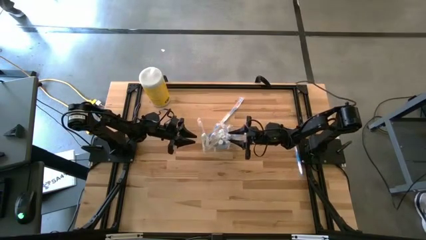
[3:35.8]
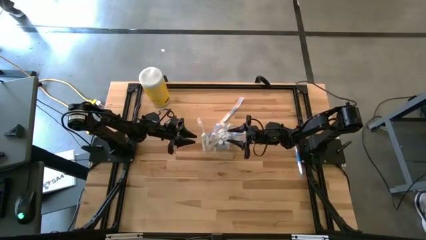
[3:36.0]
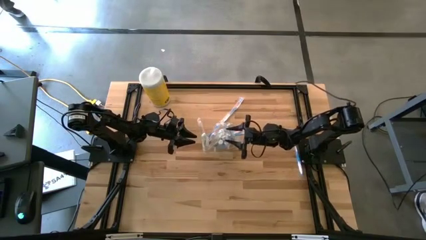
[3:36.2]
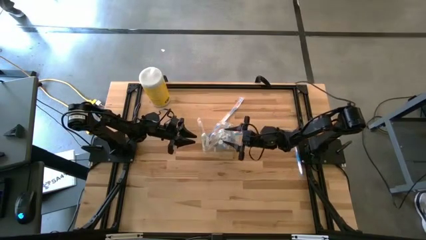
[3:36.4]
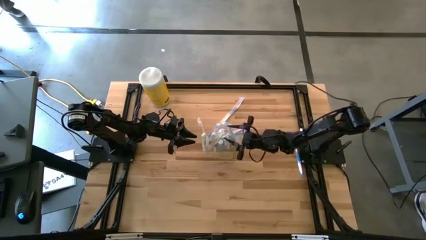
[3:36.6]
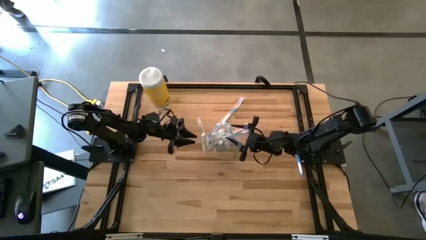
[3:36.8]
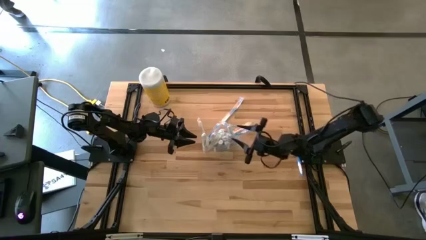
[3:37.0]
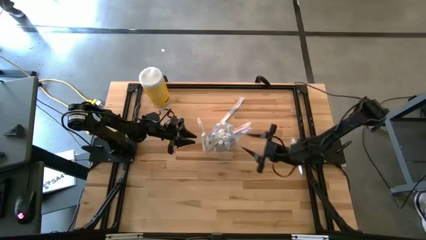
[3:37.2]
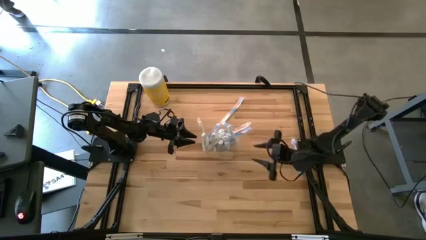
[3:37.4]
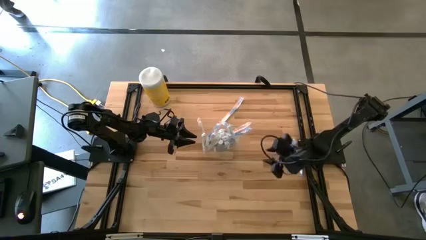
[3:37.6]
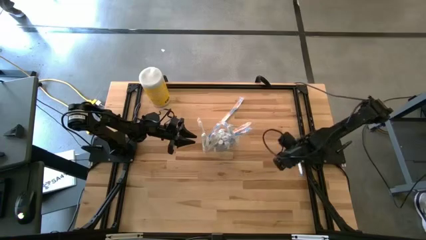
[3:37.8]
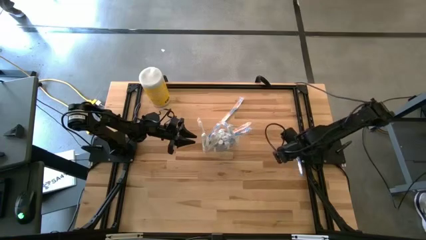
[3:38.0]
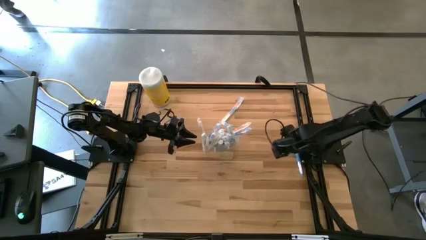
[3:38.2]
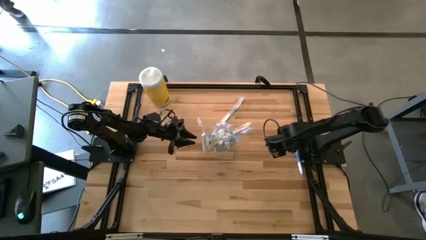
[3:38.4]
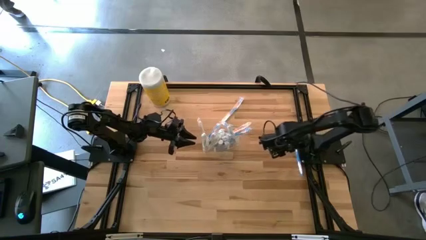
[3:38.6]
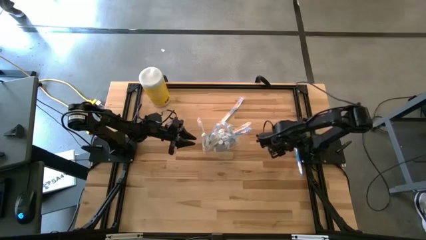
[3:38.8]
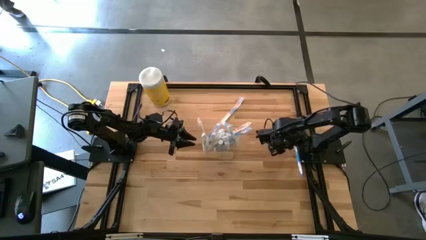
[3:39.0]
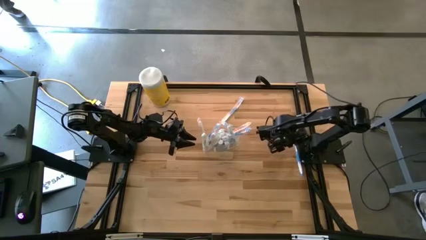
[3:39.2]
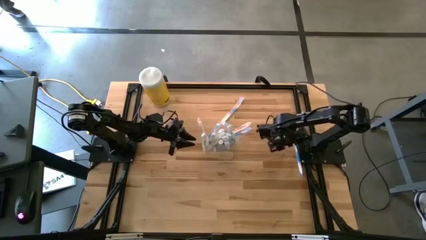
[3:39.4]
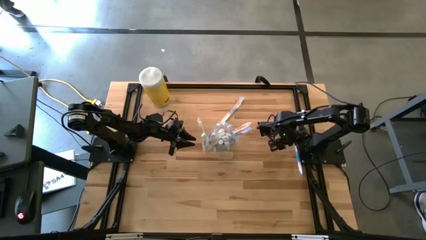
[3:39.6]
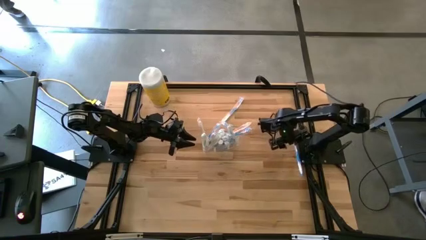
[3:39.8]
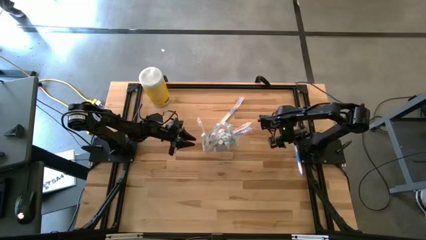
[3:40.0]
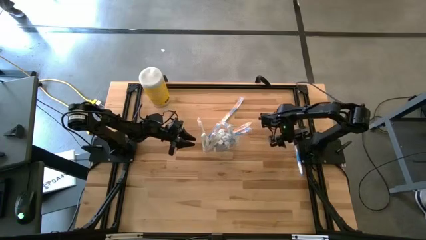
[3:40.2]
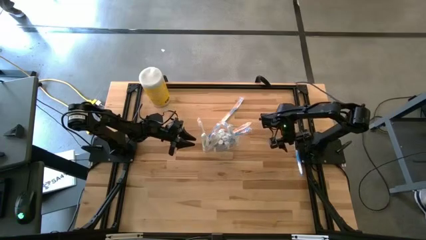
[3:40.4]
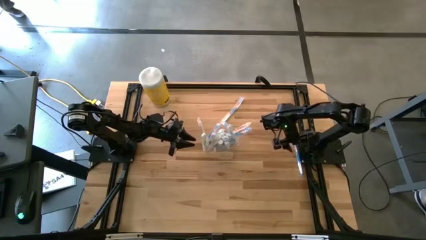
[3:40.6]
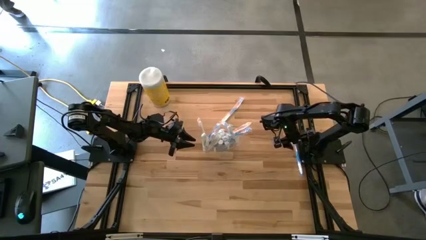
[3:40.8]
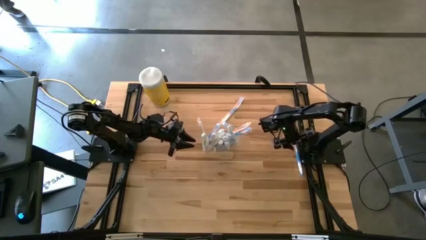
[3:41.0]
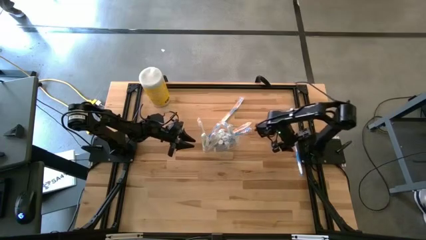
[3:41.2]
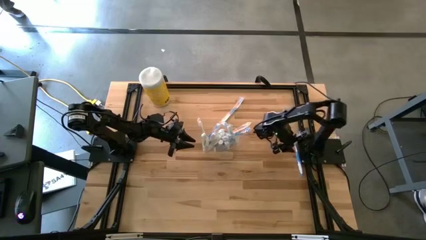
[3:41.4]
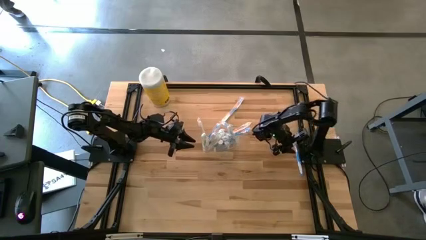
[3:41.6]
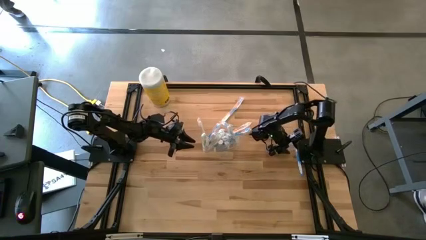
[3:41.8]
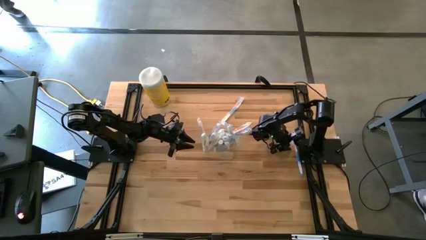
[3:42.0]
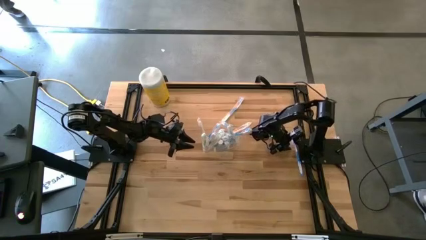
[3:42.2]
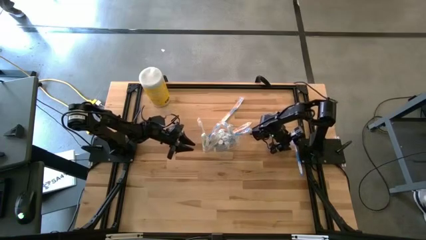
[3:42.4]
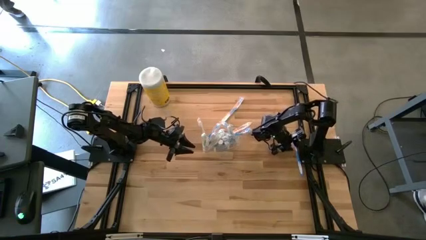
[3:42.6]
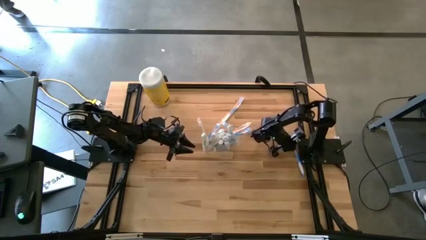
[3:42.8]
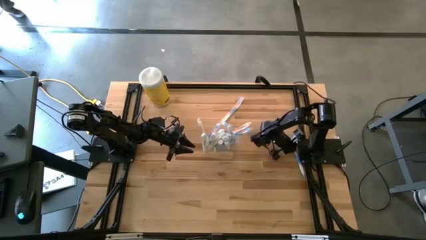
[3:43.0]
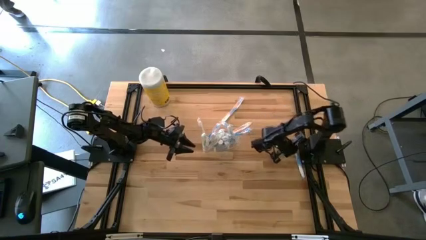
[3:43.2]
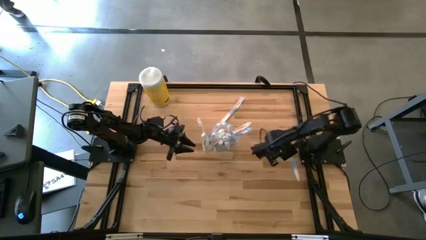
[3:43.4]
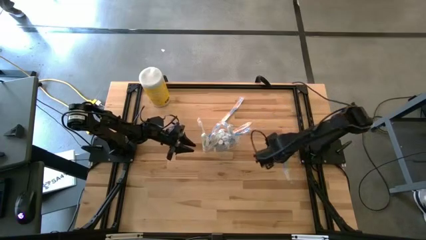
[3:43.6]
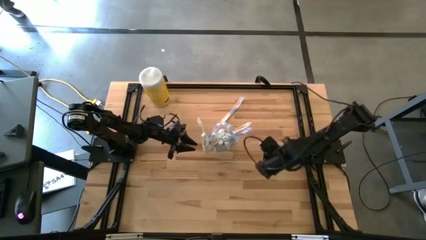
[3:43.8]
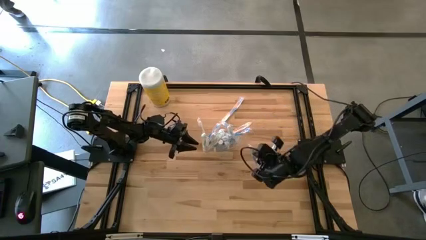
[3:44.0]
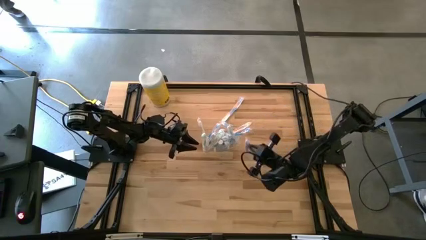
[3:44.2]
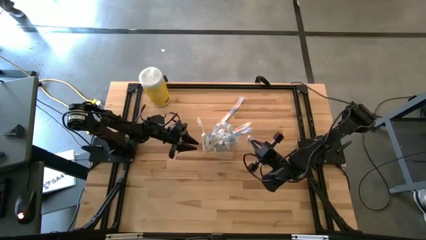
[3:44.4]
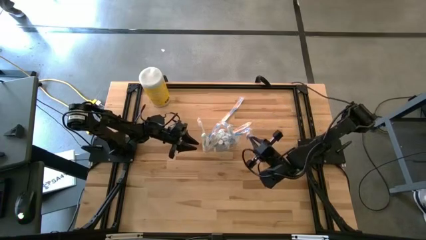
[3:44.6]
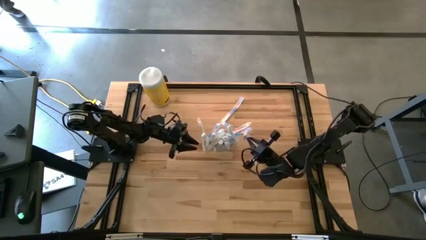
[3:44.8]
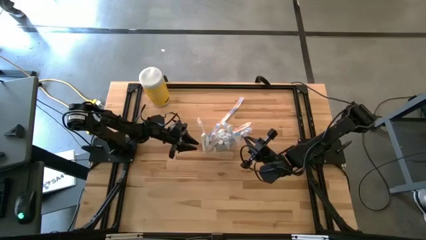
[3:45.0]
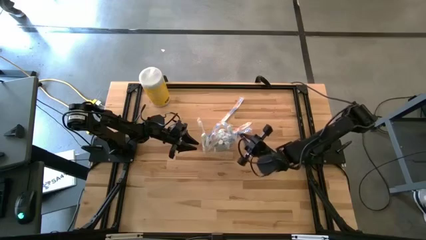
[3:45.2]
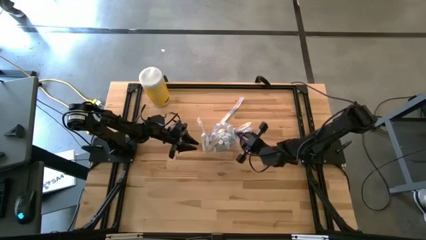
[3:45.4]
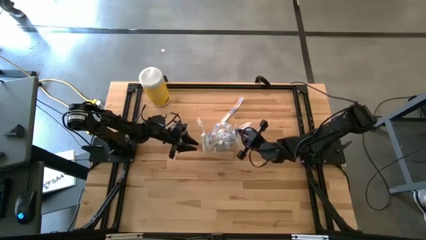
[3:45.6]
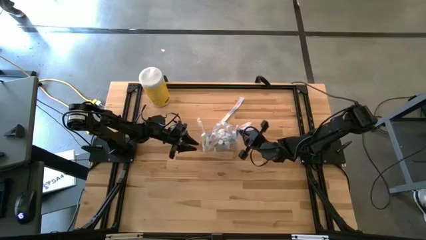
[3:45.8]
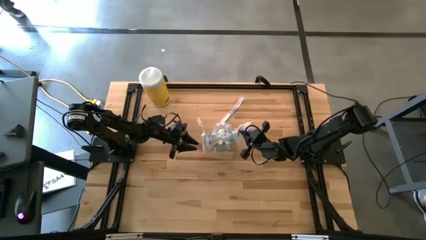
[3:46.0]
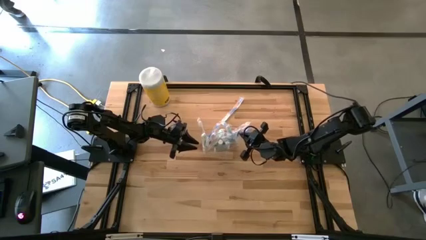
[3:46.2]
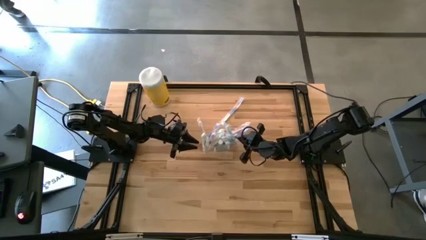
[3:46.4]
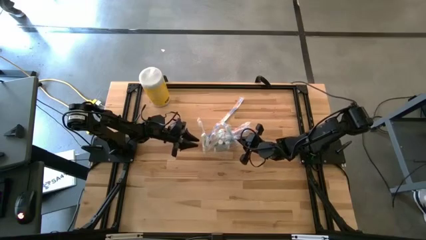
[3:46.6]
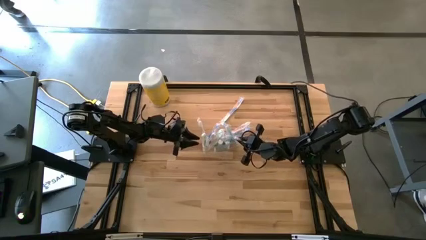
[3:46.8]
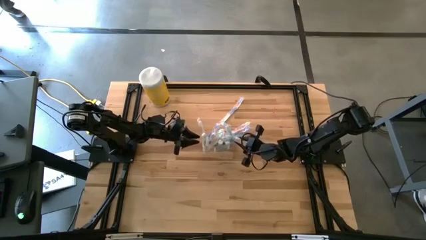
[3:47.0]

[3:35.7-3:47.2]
Task: Pick & Place toothbrushing station
Put the blue toothbrush into the transparent organizer

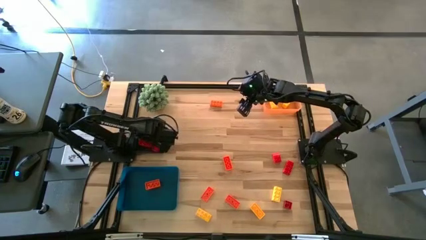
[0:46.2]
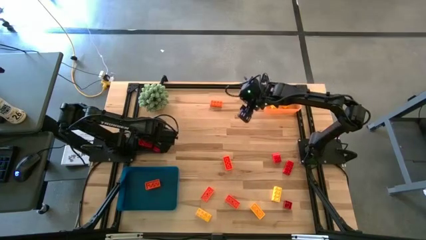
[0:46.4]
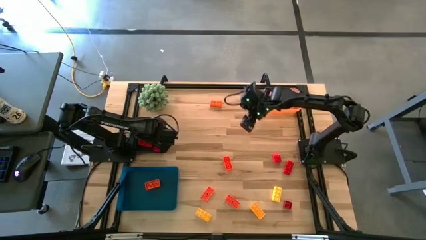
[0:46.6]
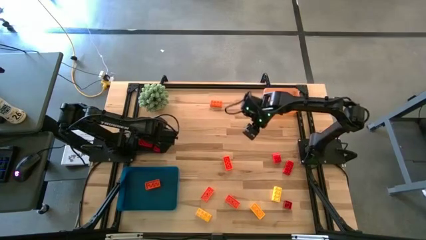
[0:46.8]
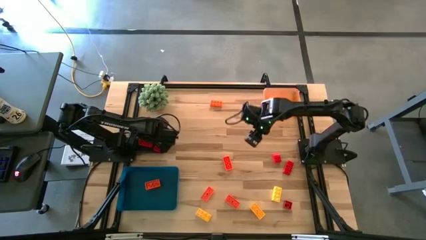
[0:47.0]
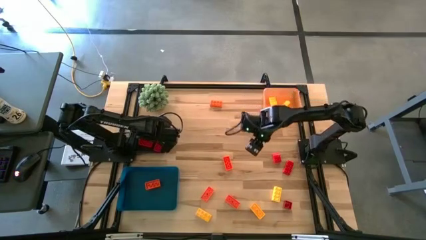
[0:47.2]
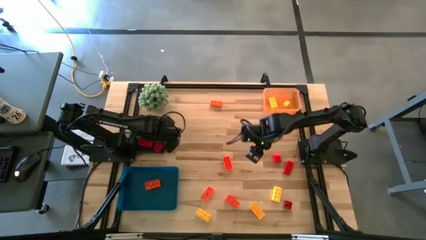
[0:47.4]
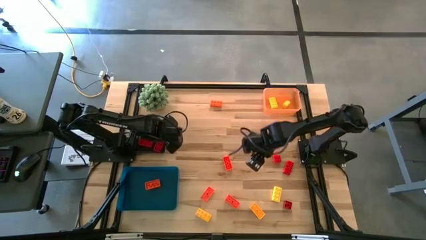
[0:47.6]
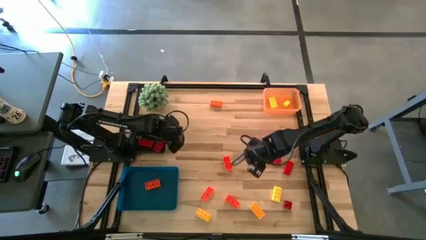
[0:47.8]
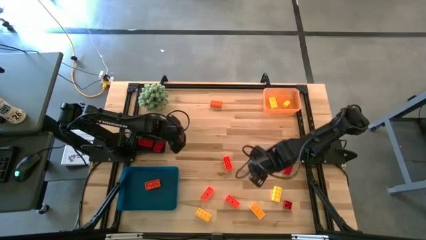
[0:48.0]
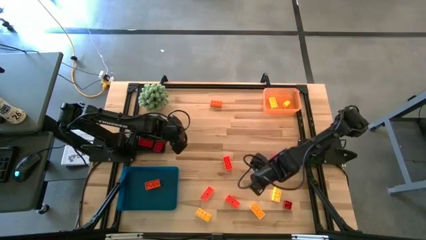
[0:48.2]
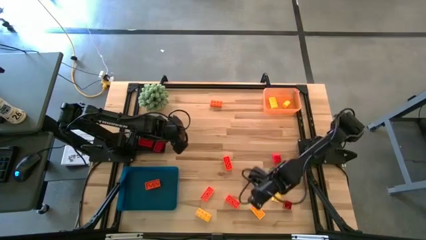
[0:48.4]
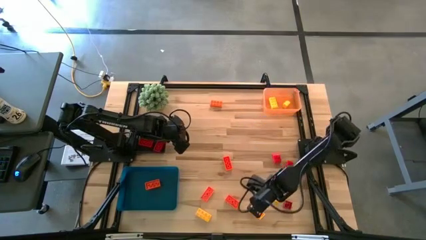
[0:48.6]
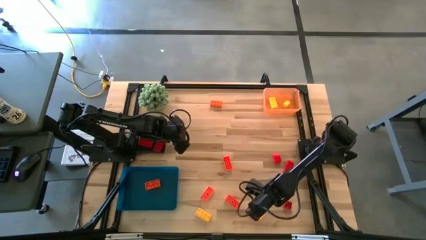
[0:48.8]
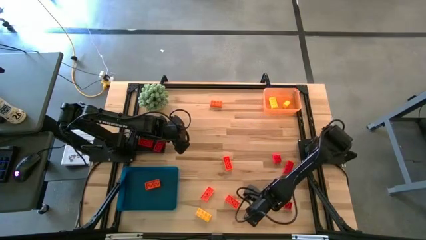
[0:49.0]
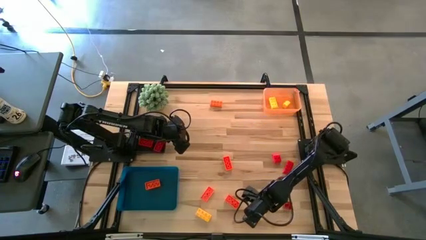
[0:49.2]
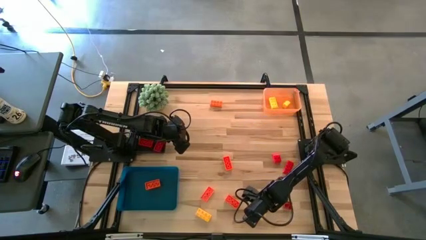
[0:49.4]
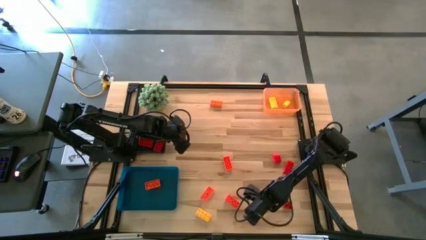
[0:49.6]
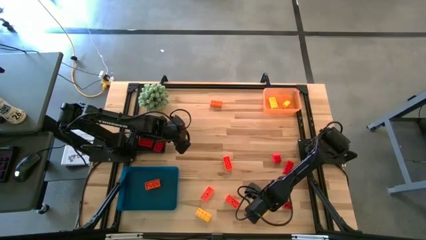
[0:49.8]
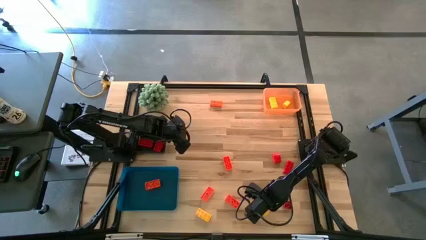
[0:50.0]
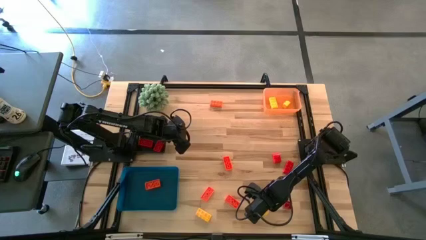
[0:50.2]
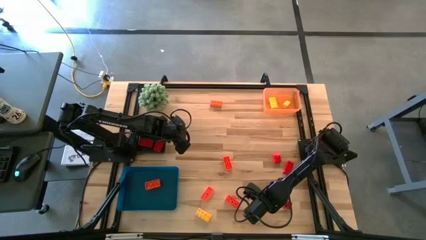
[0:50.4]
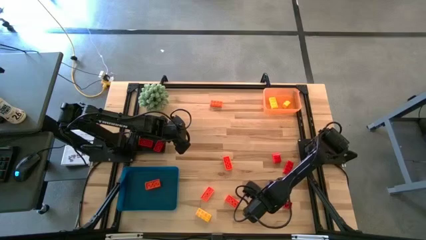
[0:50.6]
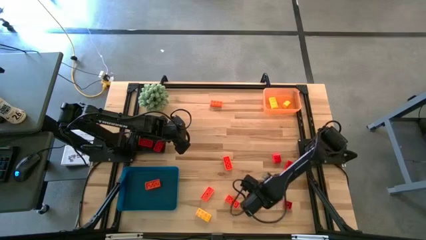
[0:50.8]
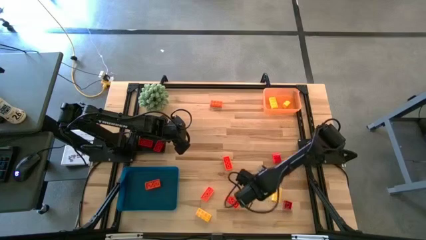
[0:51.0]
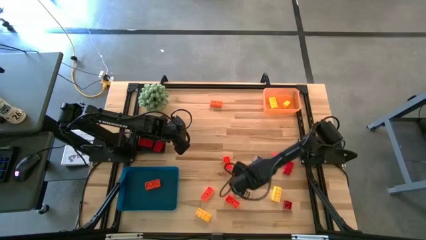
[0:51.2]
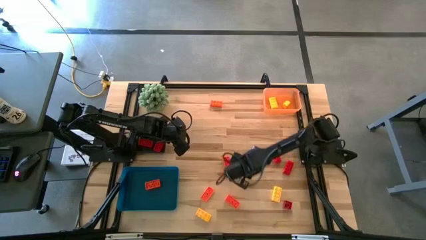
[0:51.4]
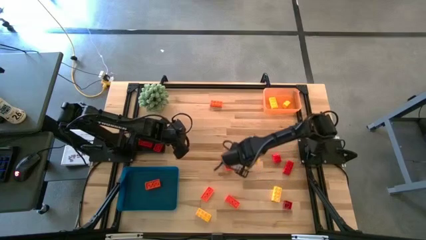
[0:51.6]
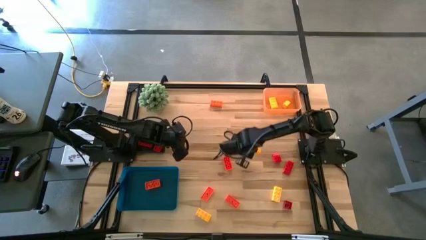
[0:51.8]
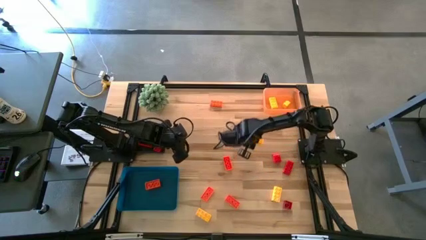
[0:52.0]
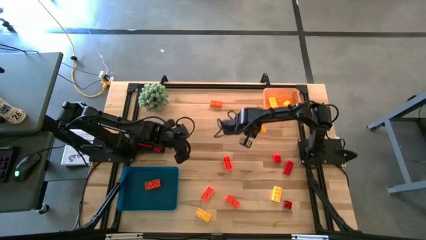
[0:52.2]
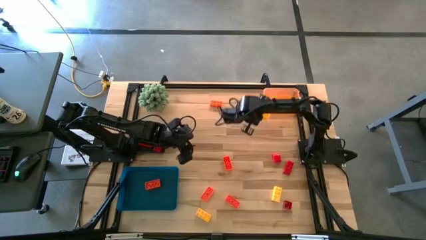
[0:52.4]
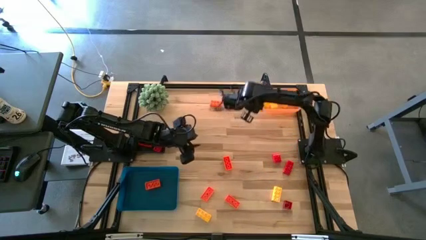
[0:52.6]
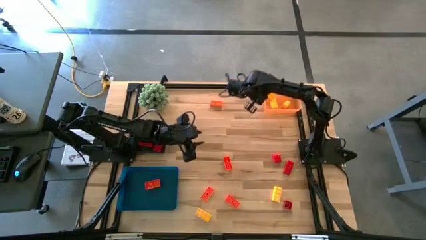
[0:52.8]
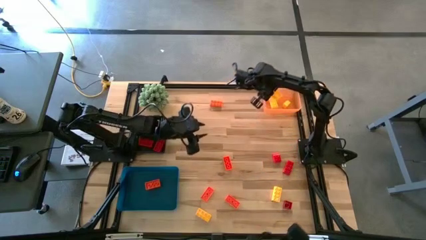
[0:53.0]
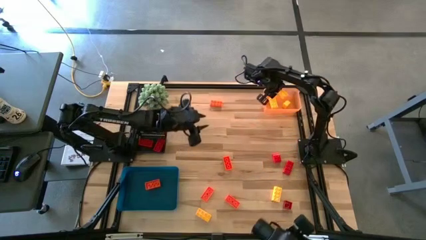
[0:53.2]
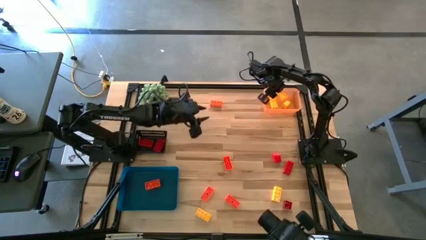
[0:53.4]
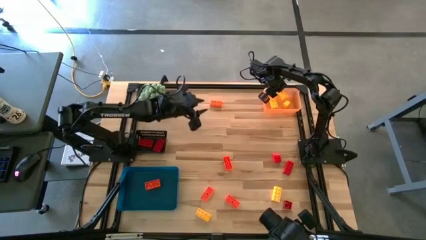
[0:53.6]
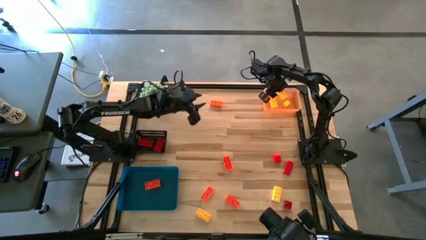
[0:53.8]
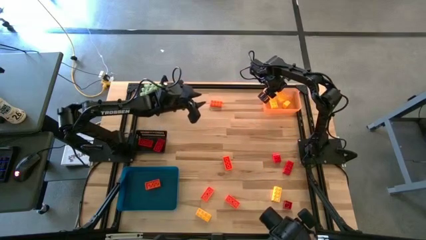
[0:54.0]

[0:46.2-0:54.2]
Task: Sort & place blocks by color
Put the yellow game piece into the orange bin
